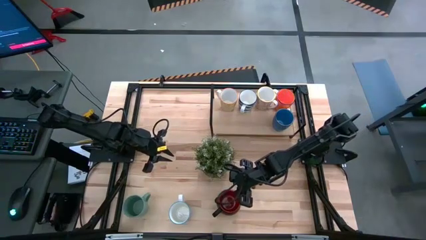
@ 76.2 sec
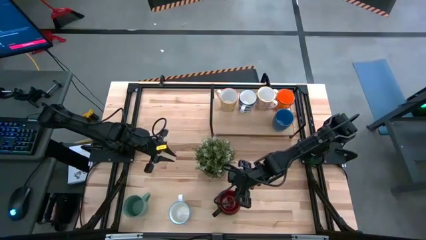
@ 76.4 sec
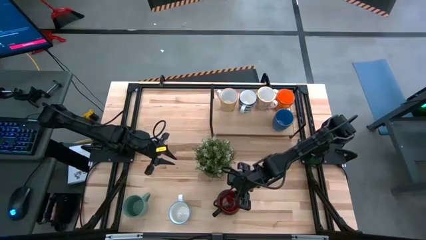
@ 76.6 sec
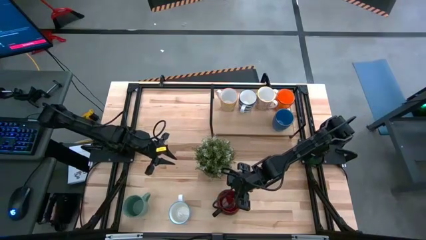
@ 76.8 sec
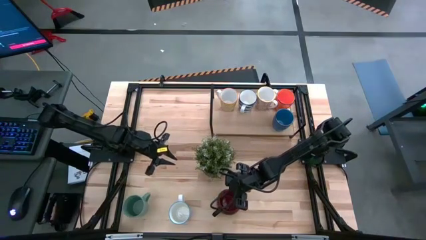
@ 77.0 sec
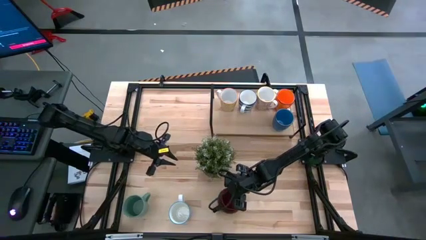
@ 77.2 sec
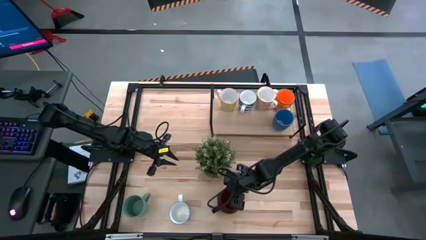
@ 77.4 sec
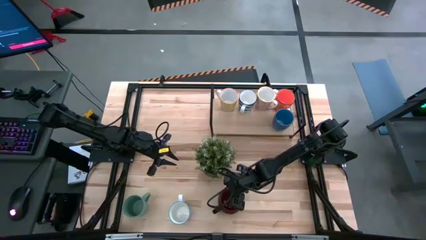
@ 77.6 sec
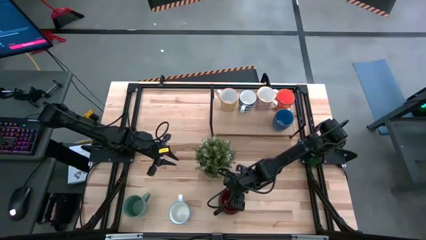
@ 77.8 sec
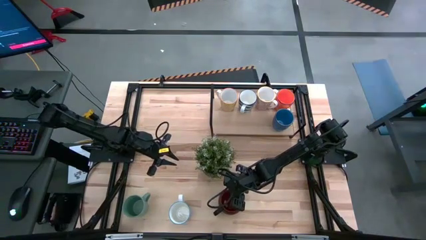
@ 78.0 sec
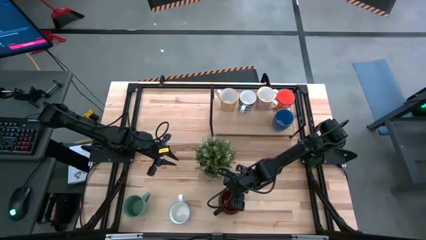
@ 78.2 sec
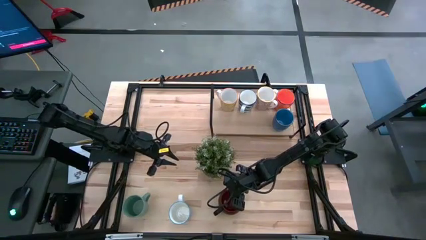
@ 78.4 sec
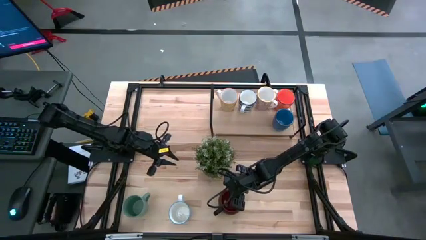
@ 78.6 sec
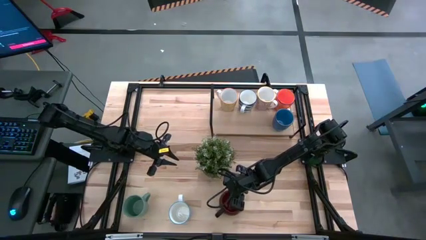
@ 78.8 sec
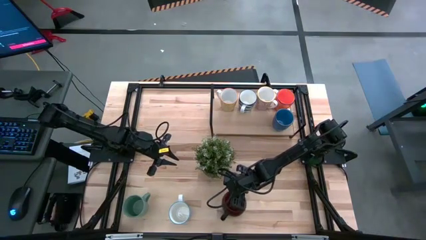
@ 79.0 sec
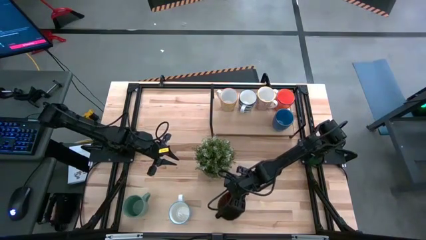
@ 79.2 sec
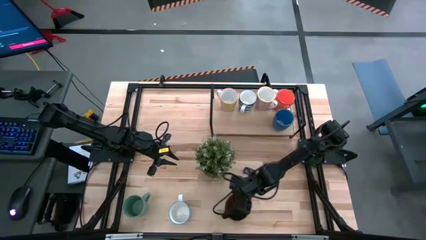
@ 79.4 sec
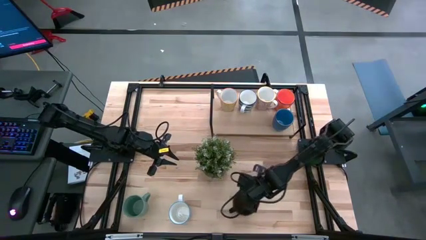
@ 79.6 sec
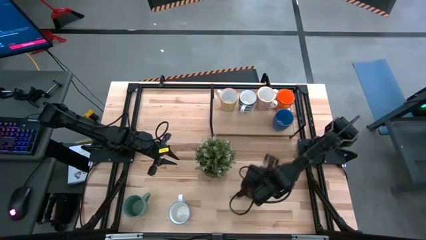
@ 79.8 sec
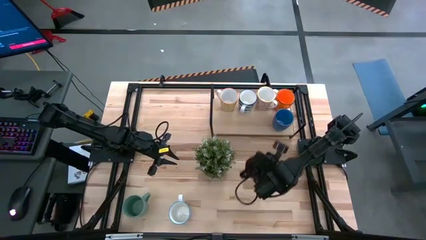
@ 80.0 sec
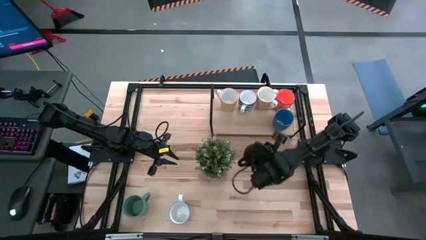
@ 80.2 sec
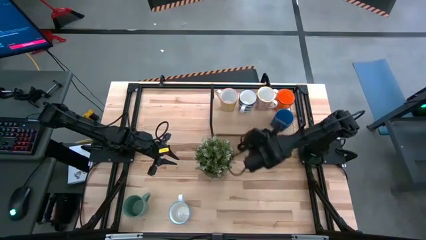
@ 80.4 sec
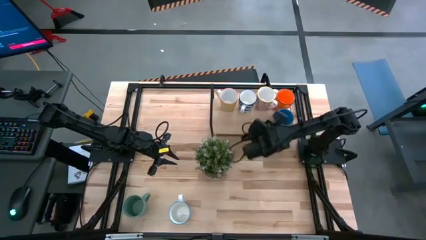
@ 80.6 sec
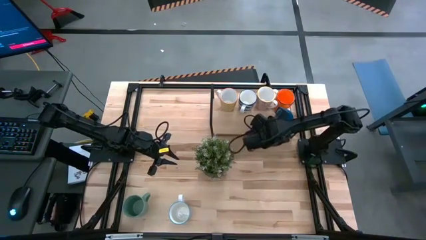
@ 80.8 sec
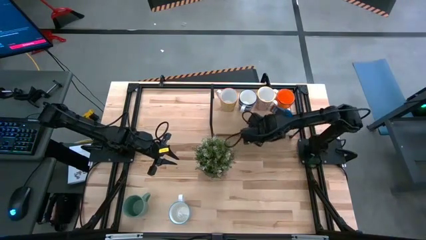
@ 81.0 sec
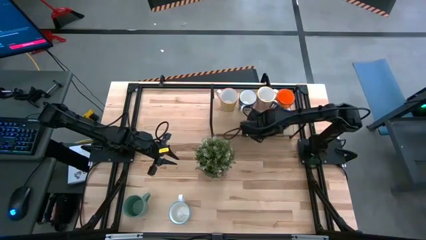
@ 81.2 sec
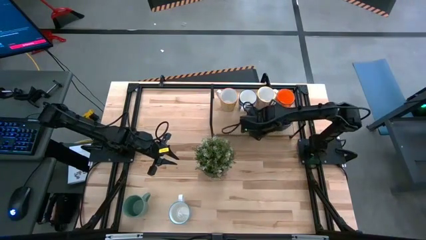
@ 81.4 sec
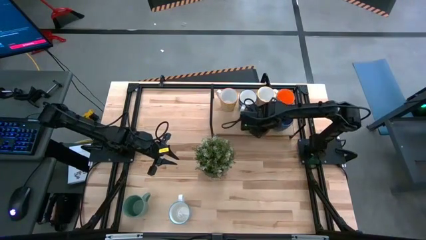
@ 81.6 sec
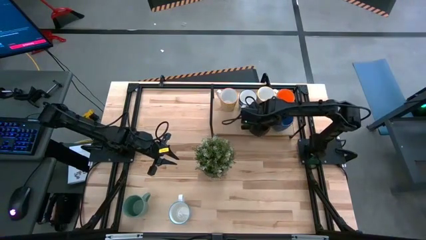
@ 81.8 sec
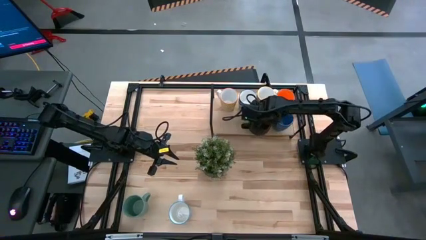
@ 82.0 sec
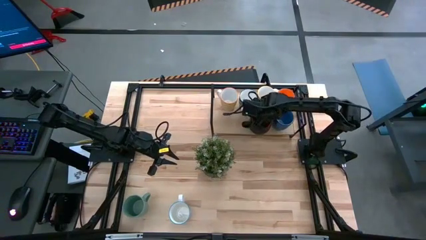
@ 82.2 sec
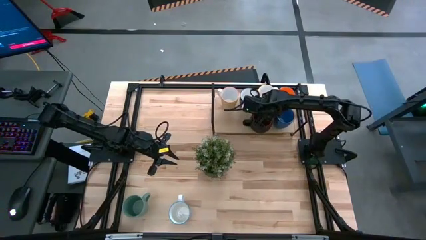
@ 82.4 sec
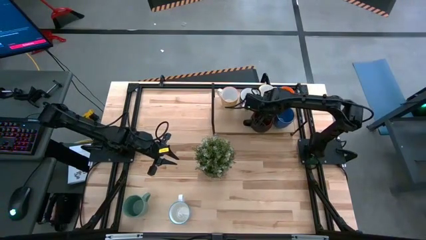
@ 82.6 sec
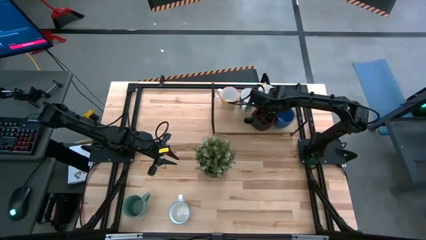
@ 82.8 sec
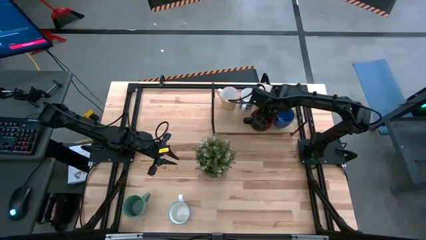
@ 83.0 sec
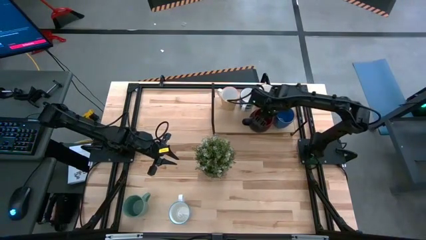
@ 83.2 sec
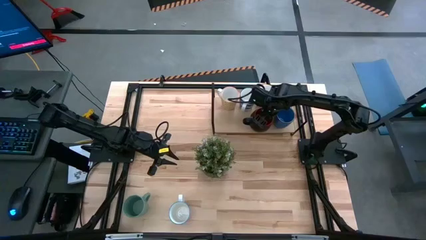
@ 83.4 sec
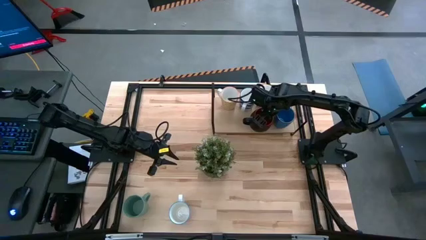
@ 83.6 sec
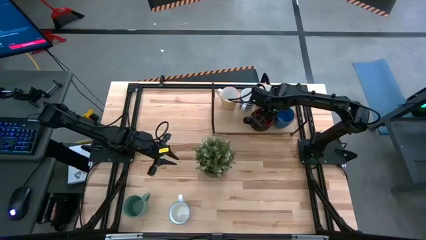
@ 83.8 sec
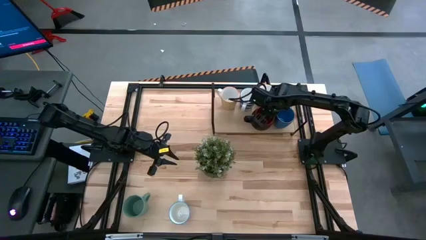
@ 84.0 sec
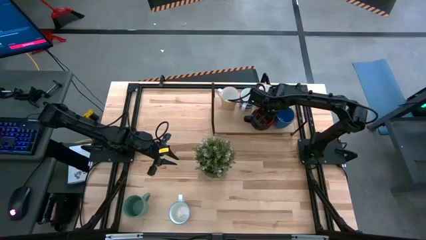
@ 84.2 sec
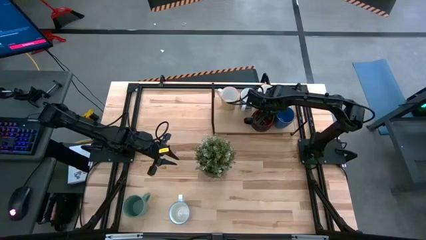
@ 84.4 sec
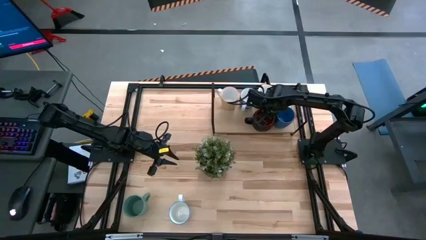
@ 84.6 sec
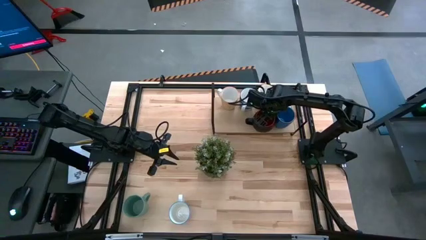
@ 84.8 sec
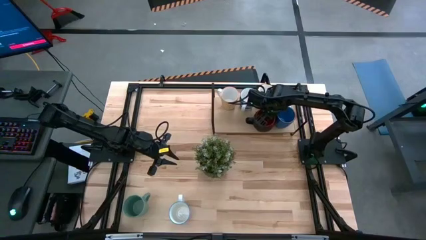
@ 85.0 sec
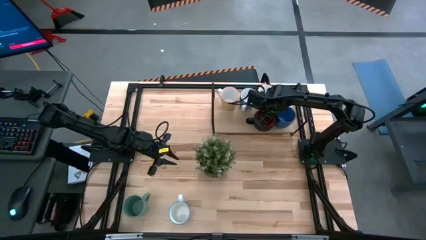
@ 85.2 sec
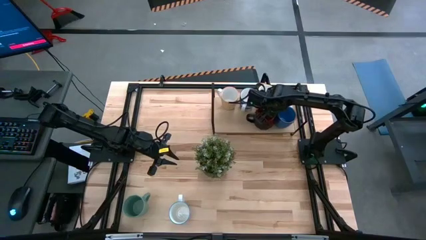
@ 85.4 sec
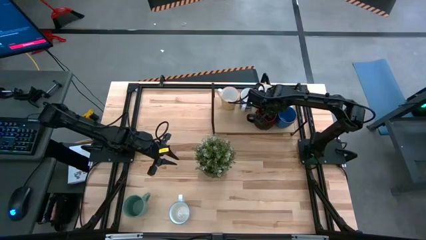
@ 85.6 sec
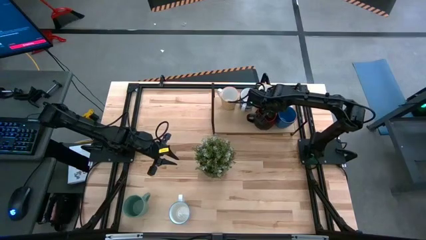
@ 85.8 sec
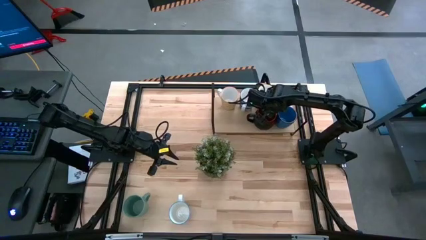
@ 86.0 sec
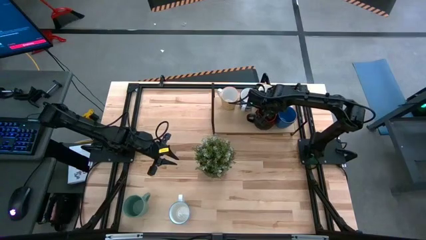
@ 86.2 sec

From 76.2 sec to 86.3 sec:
Task: Place coffee mugs
Put the black mug on the shelf
